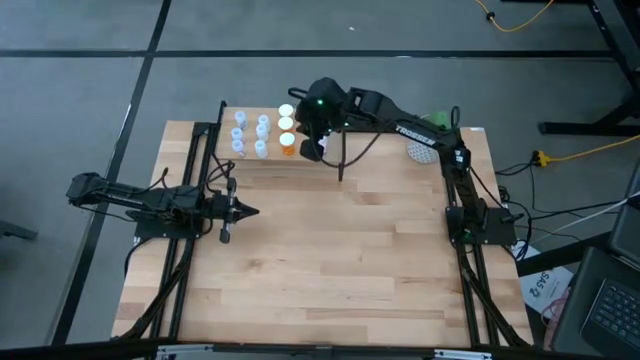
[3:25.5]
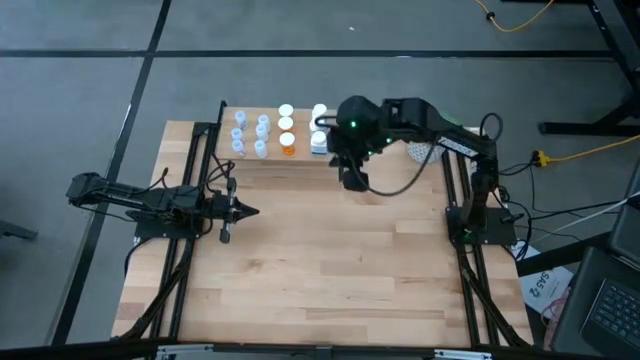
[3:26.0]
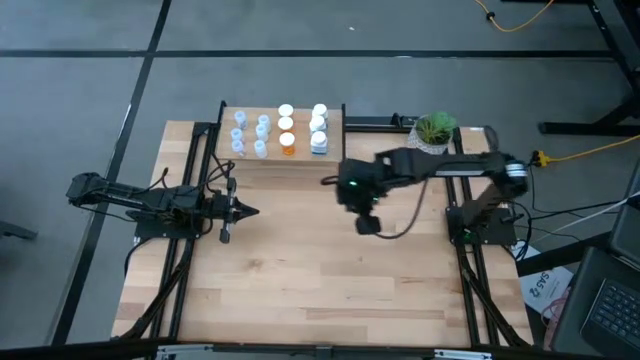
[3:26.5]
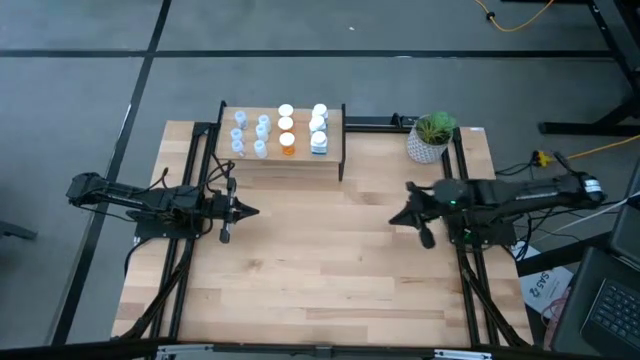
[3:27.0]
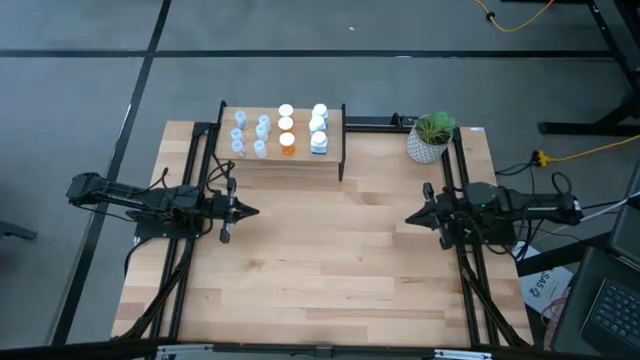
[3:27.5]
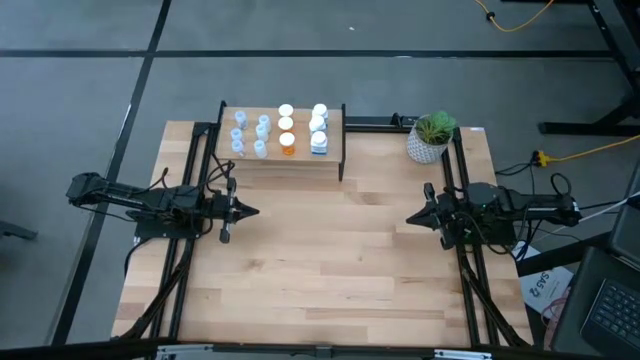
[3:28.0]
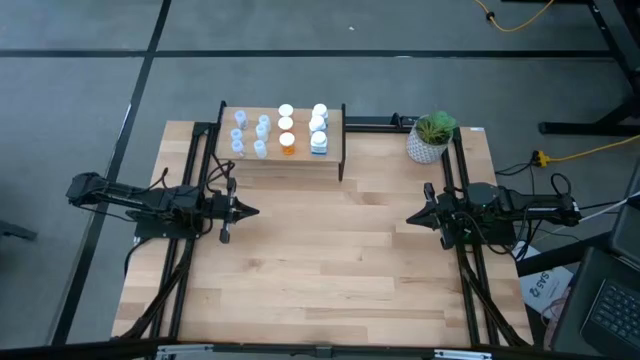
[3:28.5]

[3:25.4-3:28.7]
Task: Pick and place medicine bottles onto shelf by color
Return to Home Position

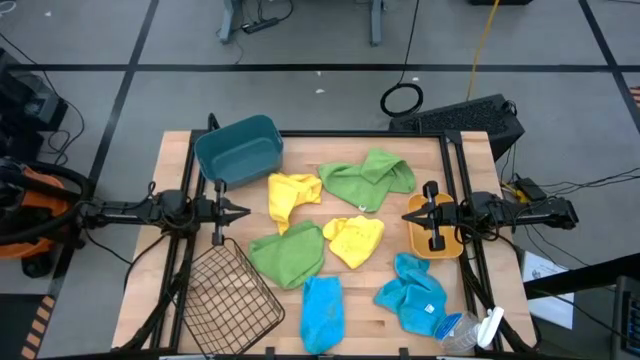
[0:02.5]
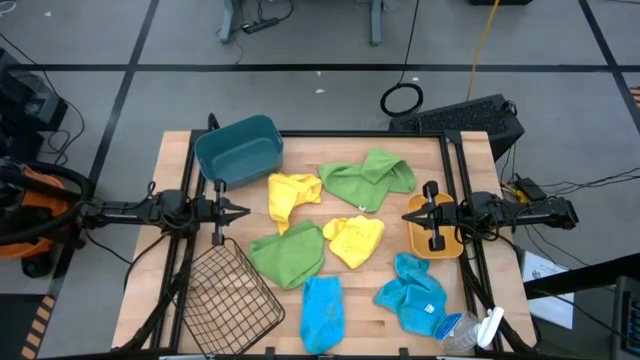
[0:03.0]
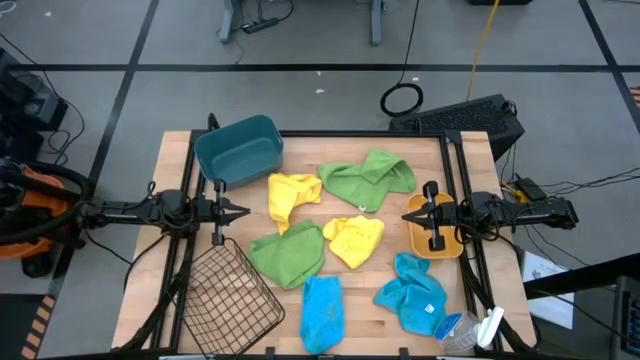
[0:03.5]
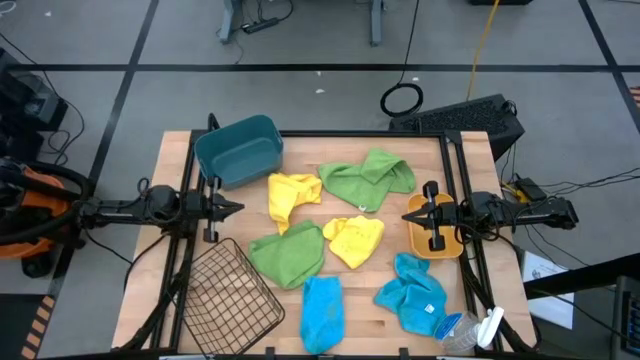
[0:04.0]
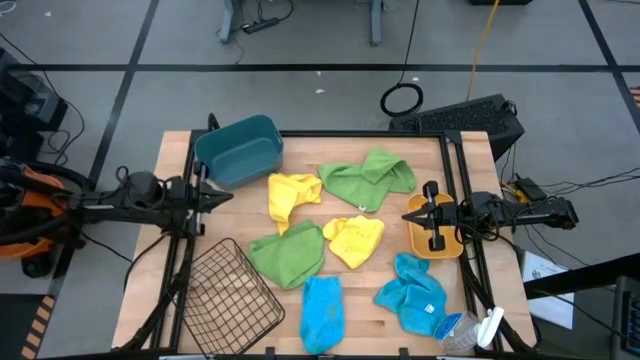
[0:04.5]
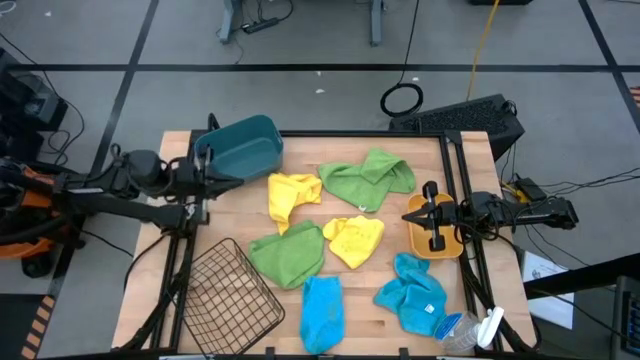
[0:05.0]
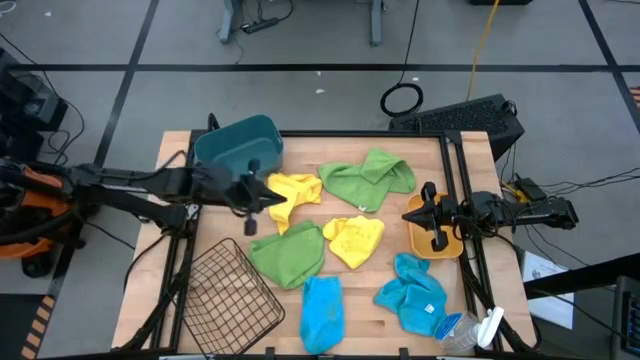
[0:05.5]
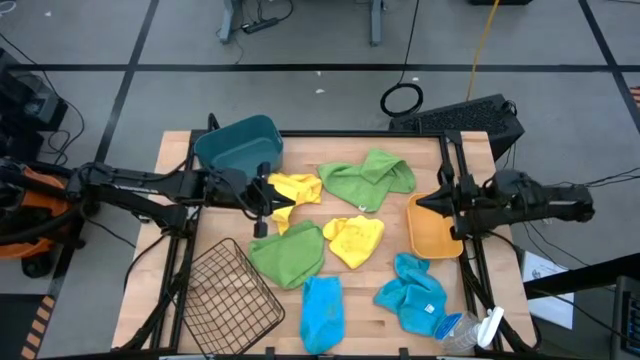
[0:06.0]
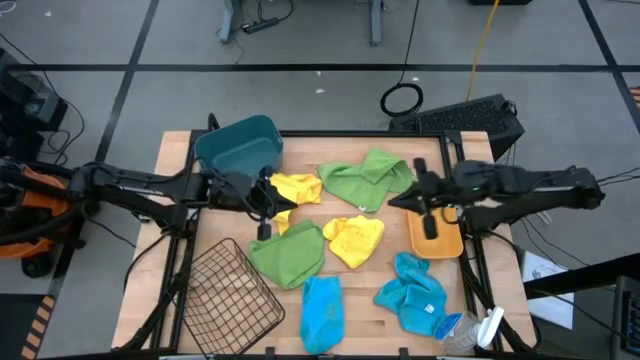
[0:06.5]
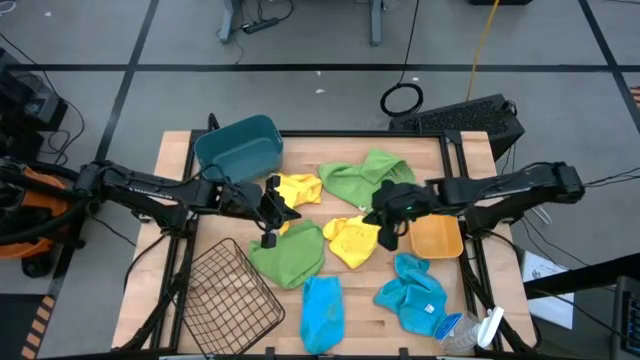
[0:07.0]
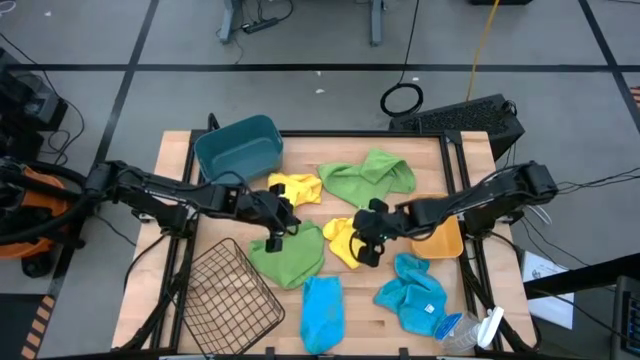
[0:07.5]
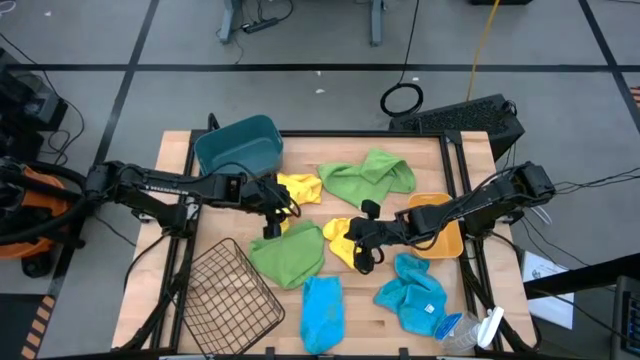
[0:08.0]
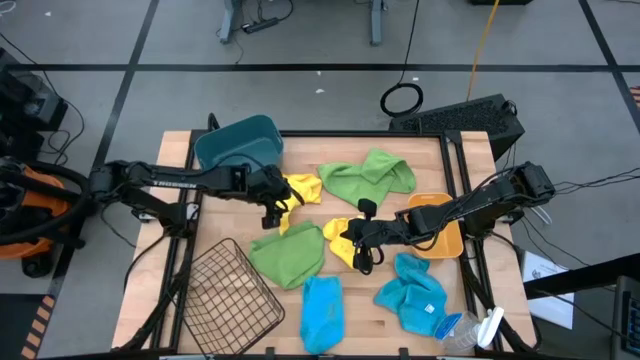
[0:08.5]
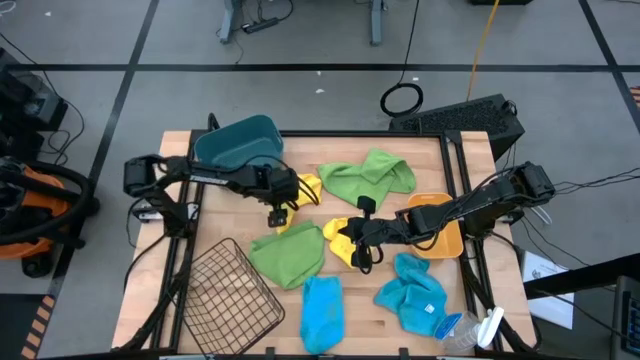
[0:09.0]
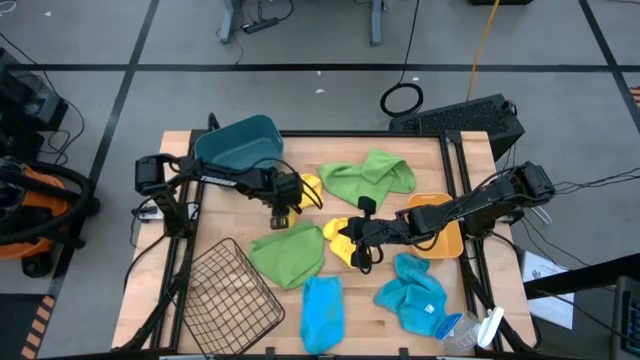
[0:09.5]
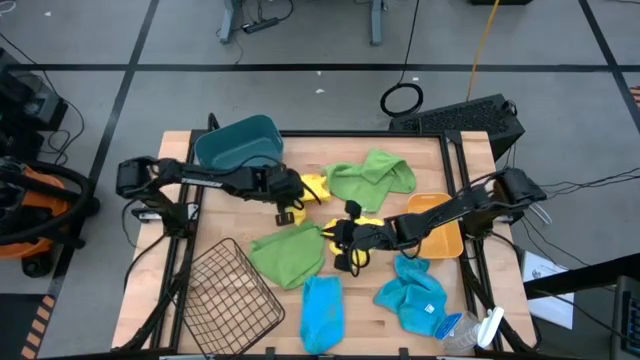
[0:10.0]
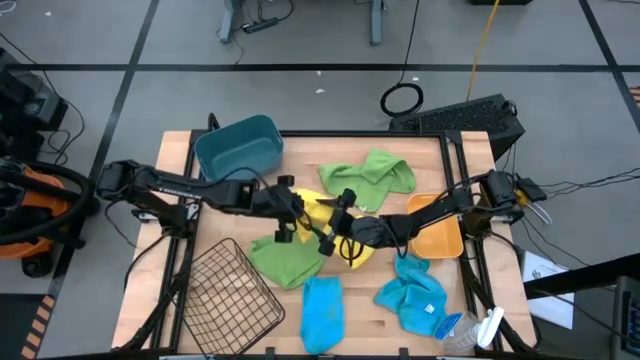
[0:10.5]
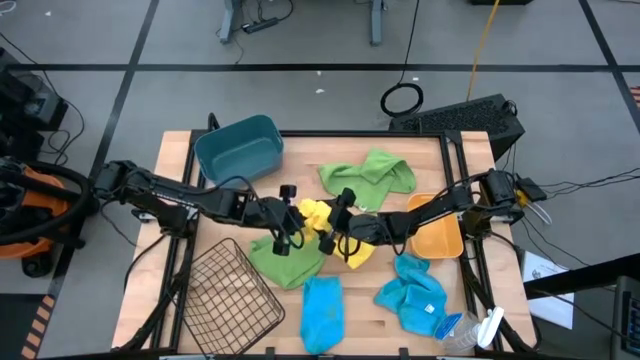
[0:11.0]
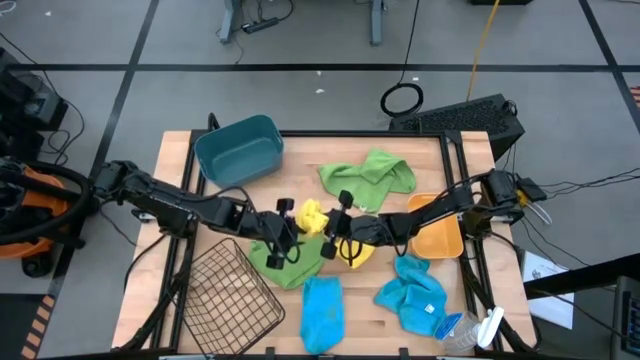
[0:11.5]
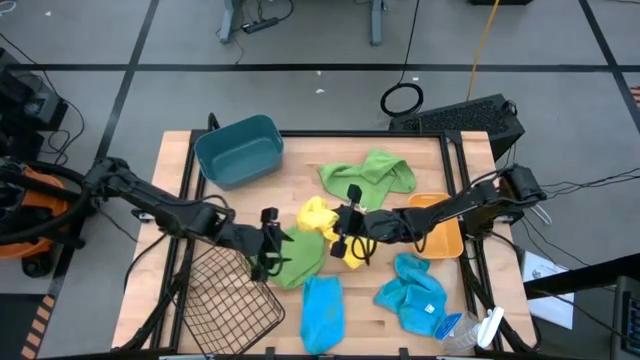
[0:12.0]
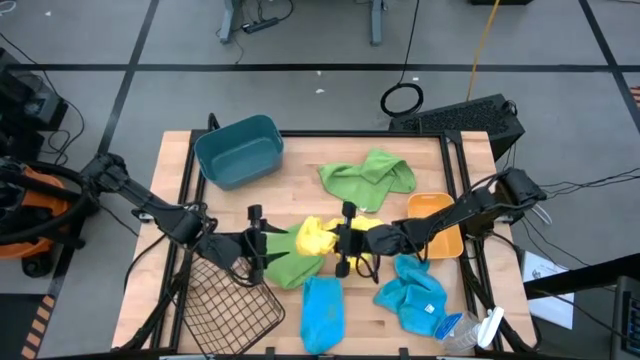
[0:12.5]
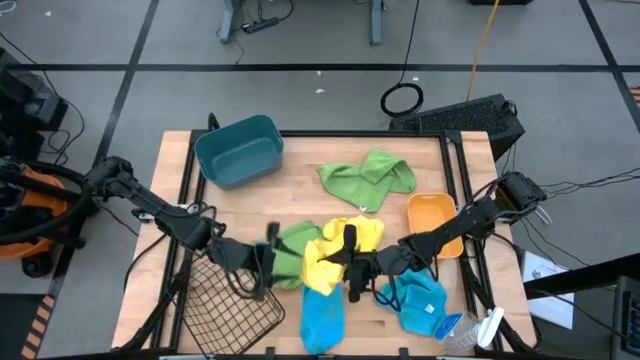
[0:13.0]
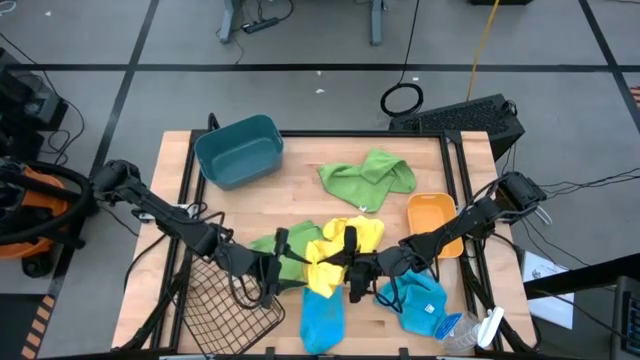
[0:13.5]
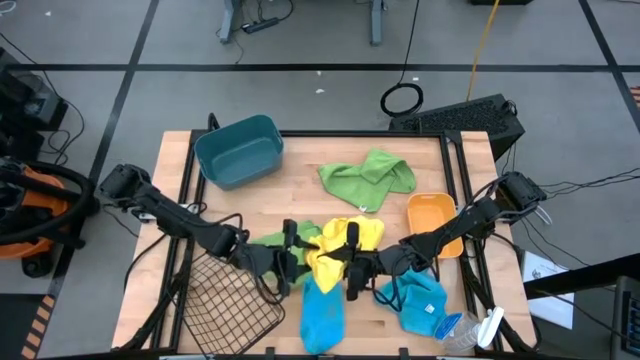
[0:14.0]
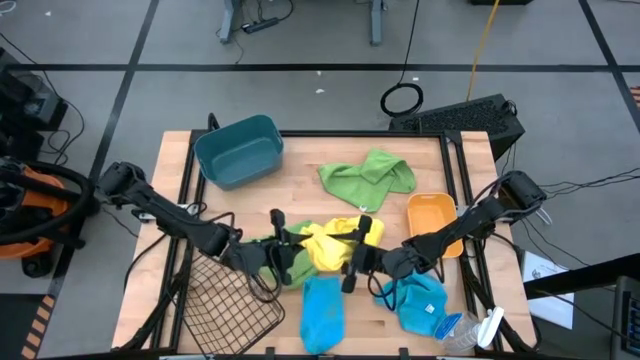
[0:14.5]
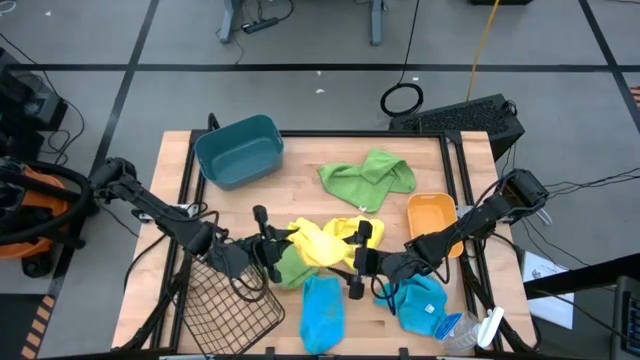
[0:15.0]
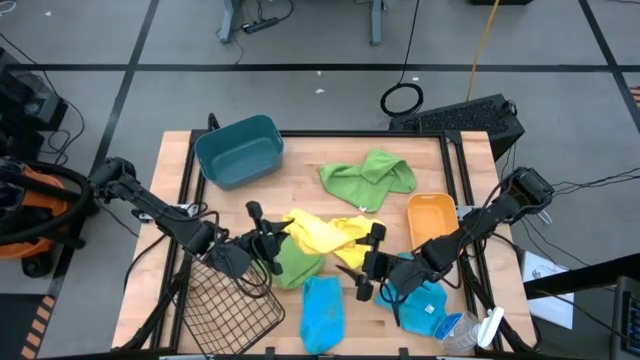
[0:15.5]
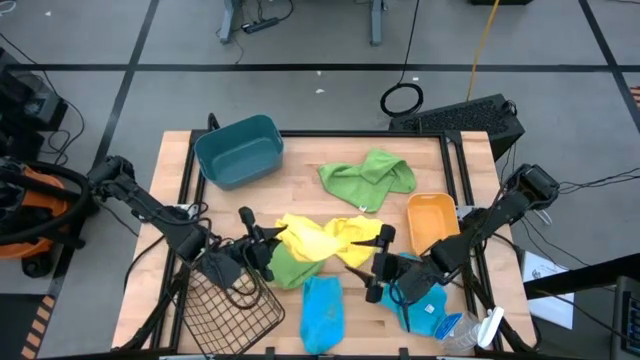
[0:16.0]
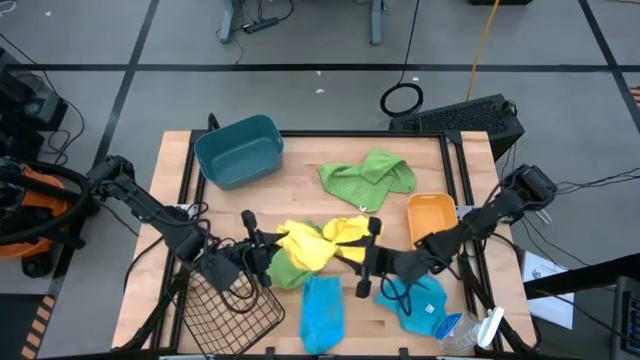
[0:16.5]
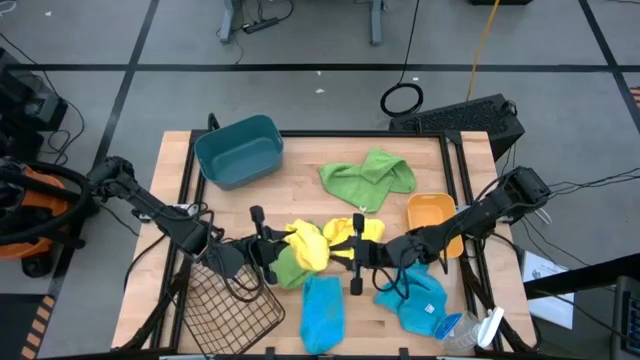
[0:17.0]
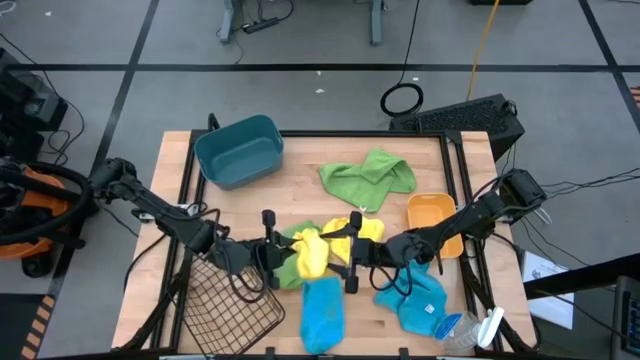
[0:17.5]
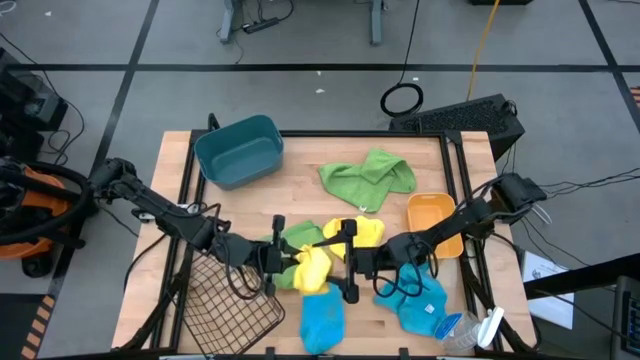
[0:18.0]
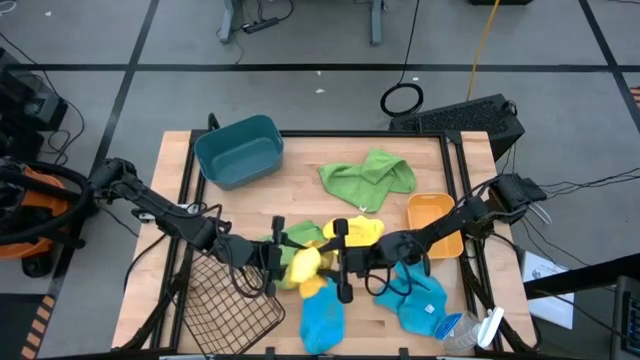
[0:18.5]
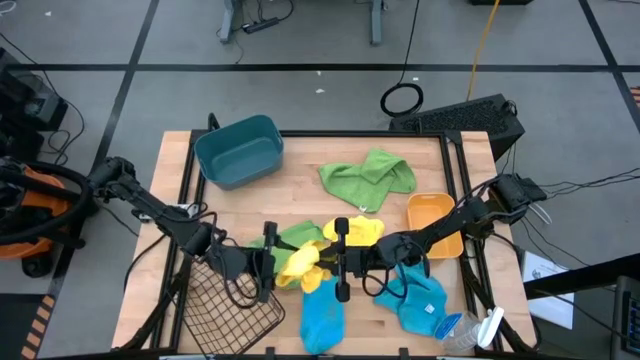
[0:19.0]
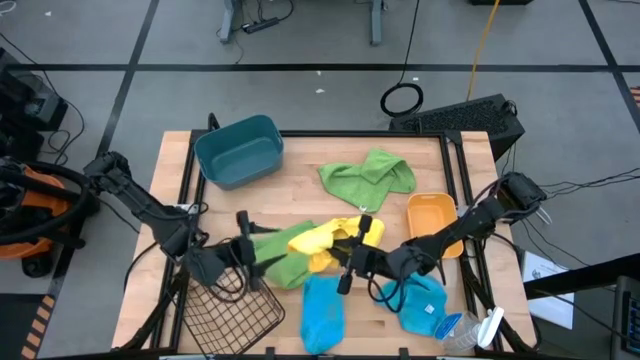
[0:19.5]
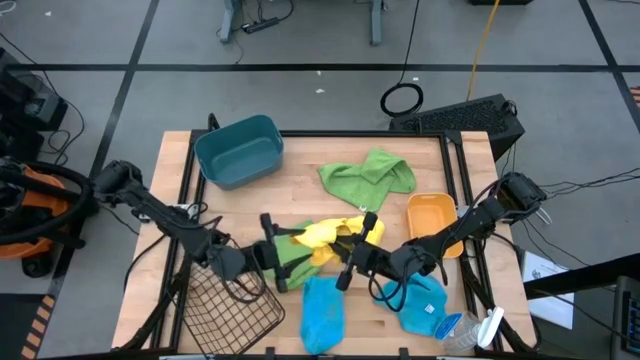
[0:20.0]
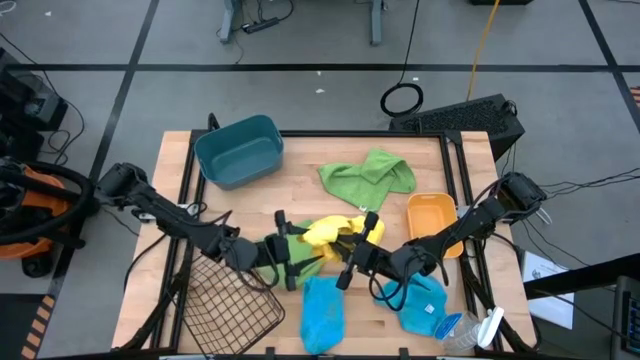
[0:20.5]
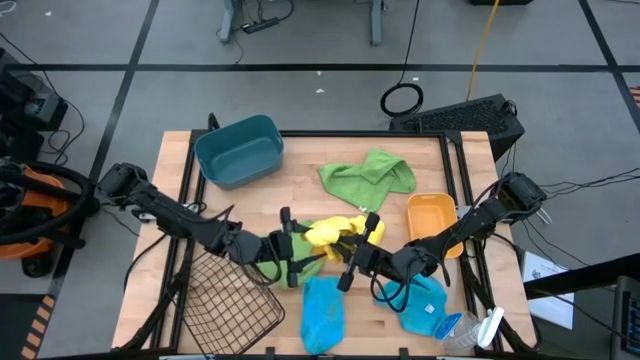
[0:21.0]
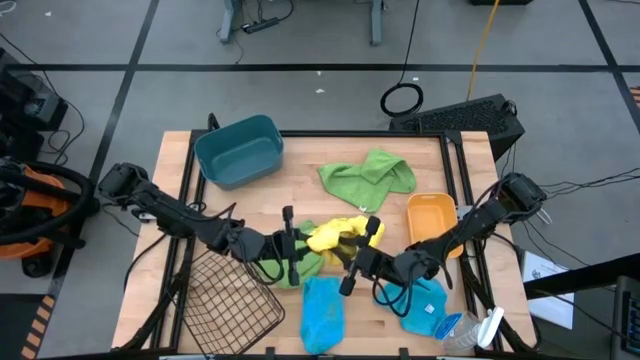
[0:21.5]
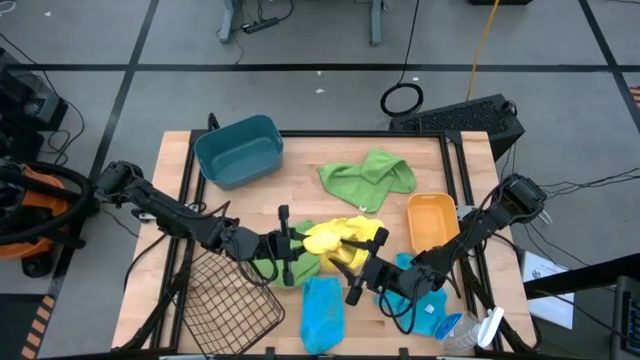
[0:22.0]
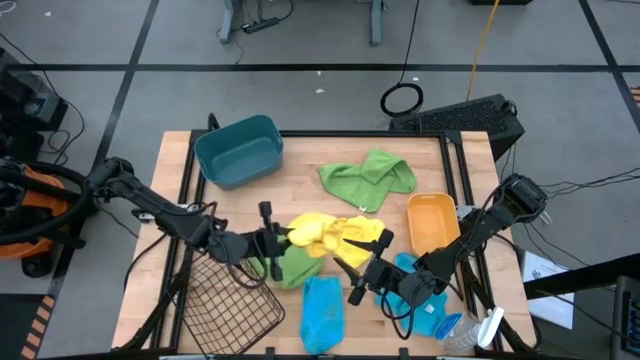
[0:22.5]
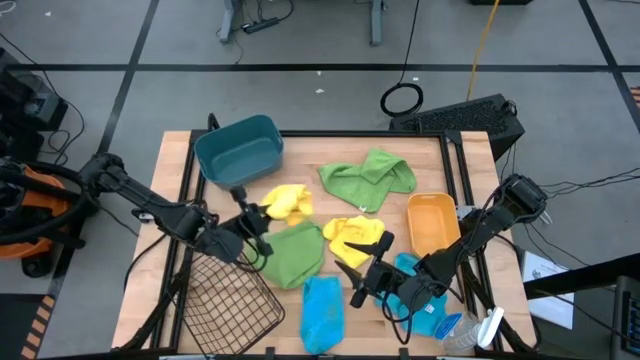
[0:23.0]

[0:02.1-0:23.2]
Task: Sort microfiber towel by color & place in baskets
Roll upper left yellow towel
